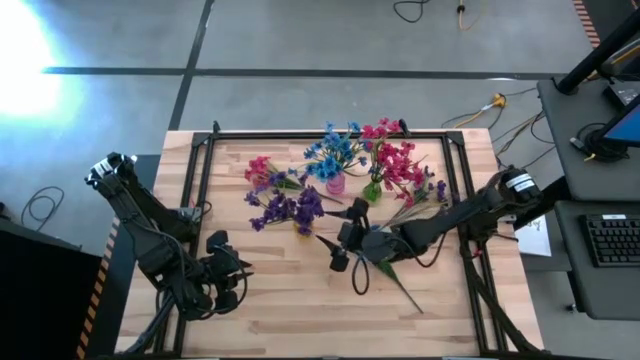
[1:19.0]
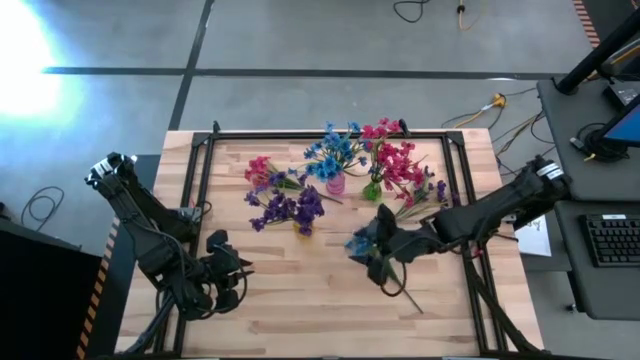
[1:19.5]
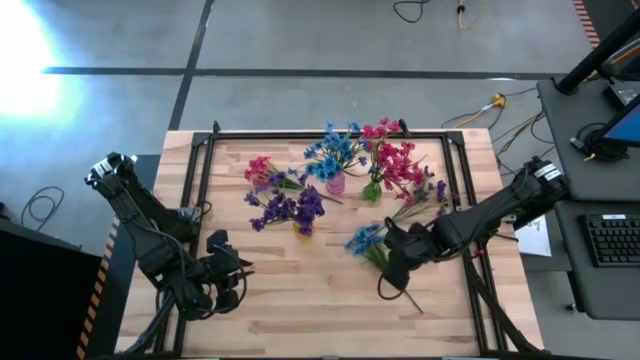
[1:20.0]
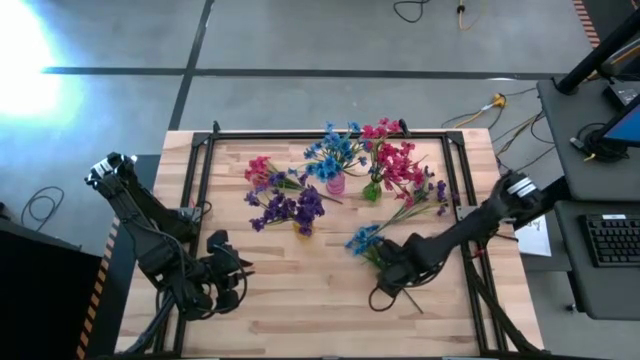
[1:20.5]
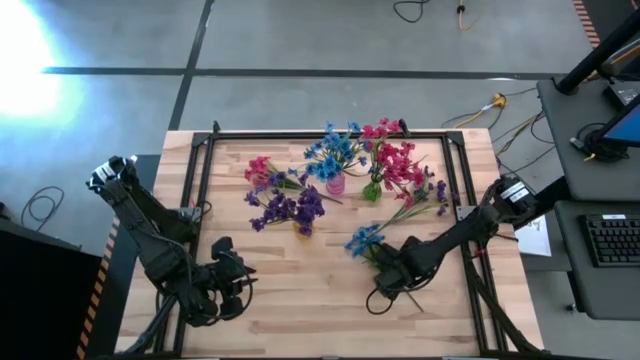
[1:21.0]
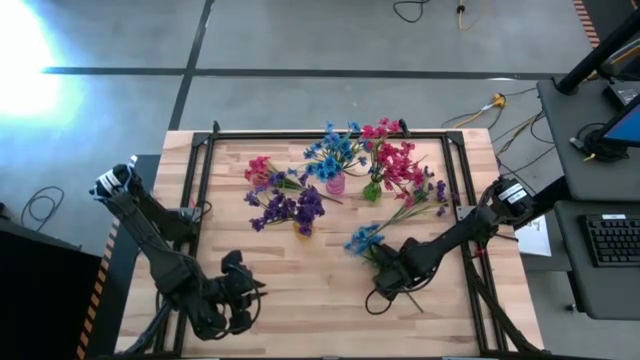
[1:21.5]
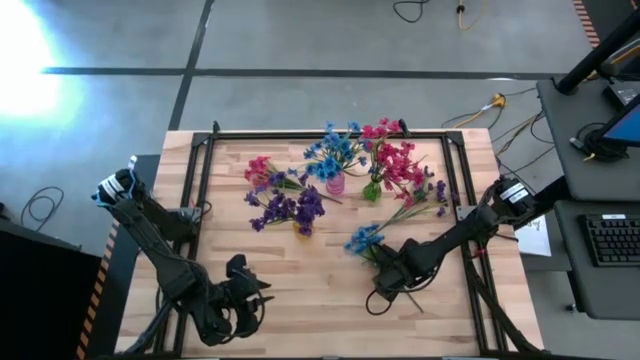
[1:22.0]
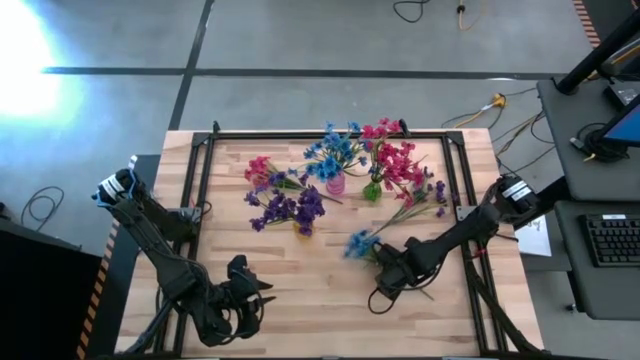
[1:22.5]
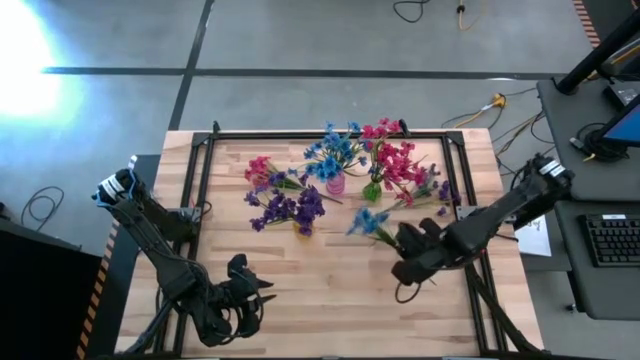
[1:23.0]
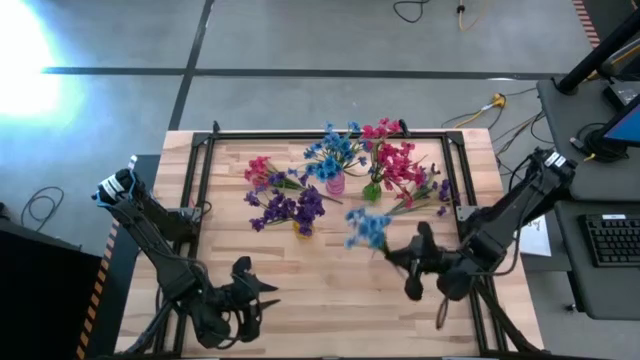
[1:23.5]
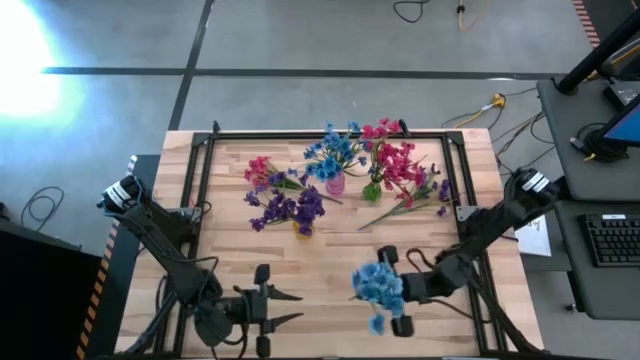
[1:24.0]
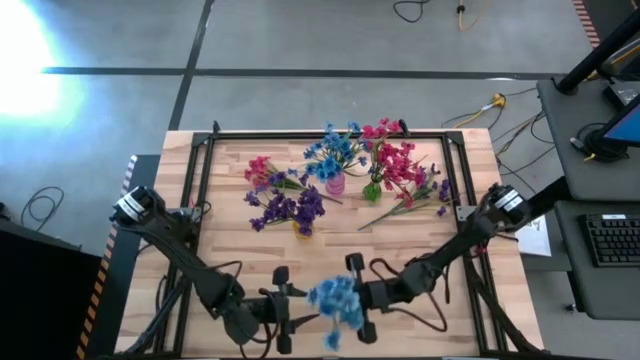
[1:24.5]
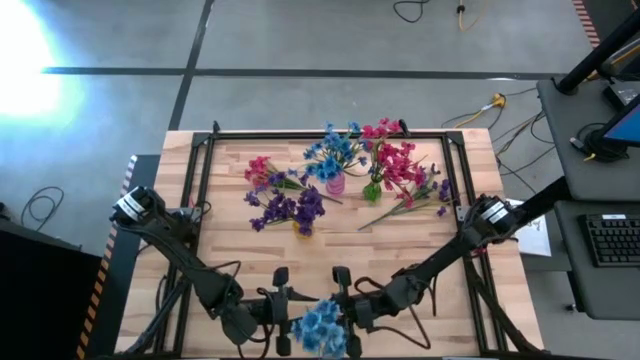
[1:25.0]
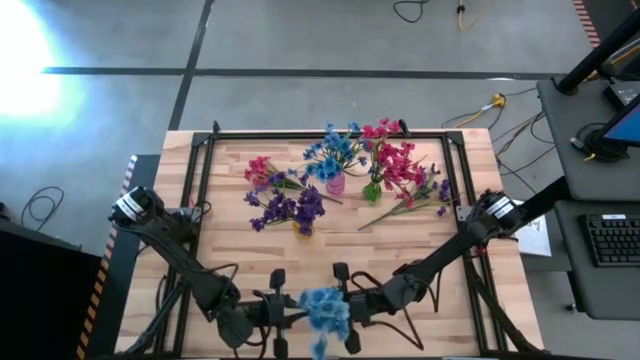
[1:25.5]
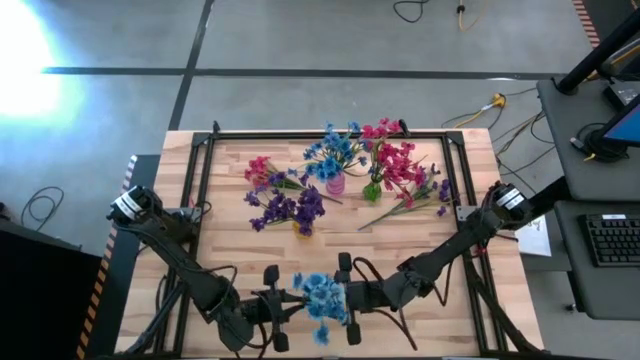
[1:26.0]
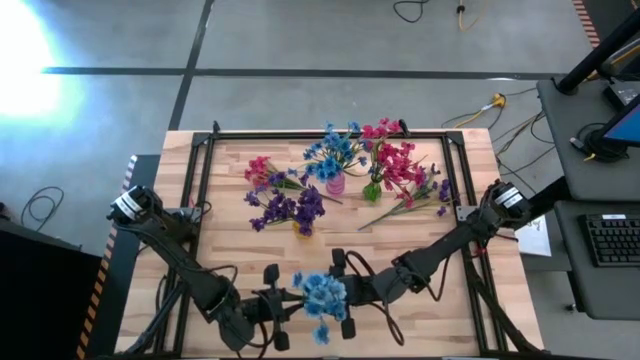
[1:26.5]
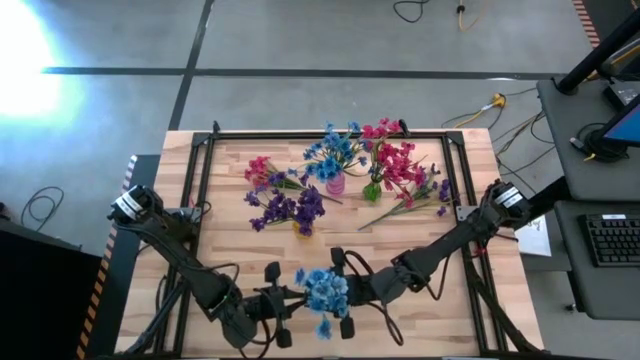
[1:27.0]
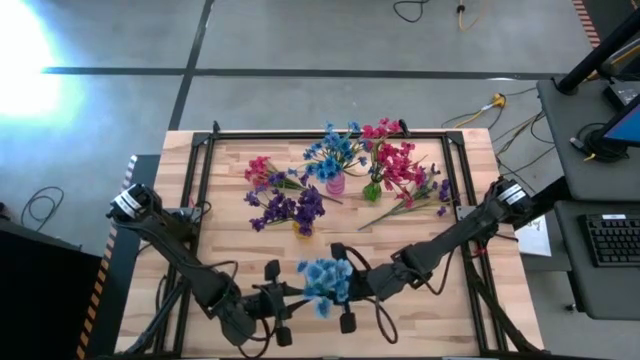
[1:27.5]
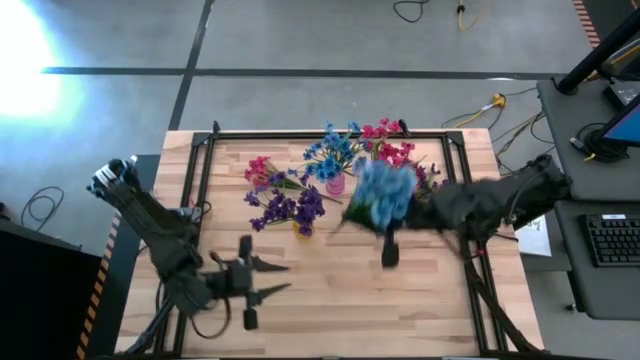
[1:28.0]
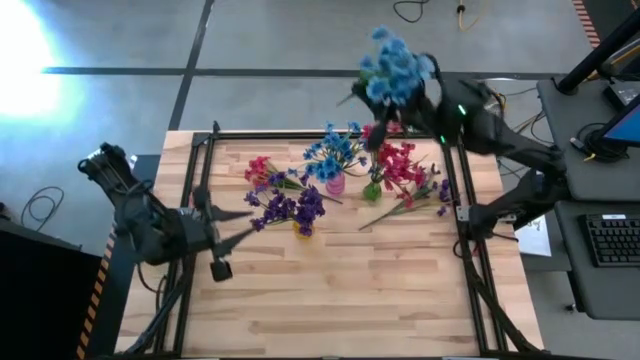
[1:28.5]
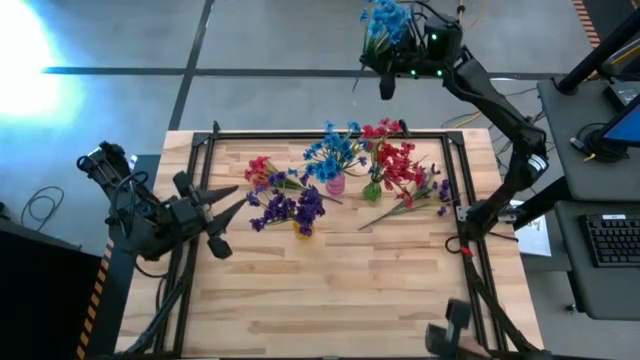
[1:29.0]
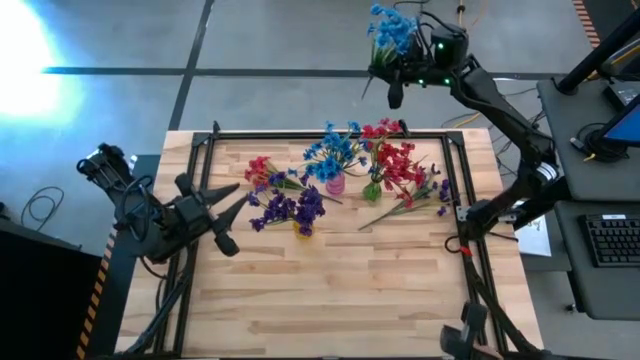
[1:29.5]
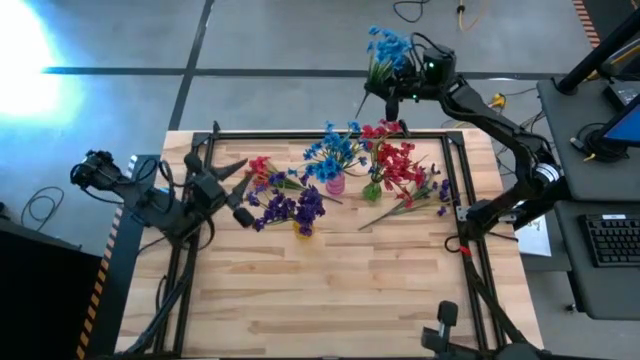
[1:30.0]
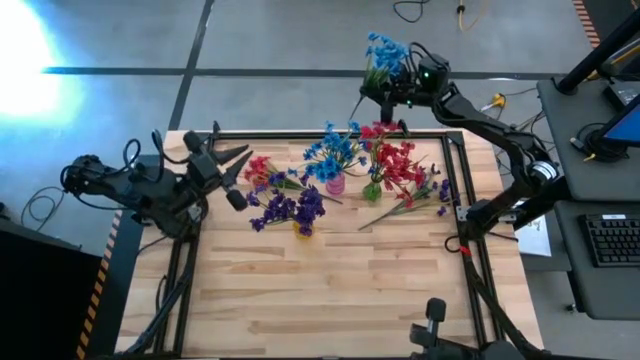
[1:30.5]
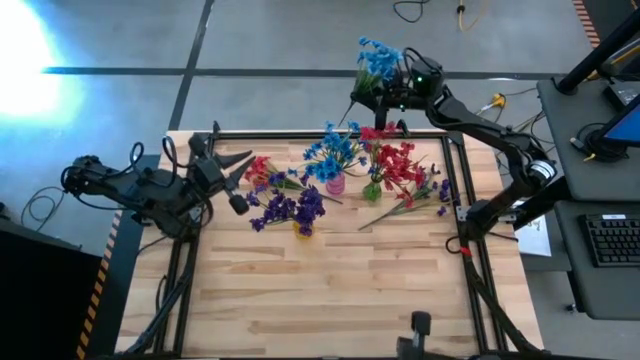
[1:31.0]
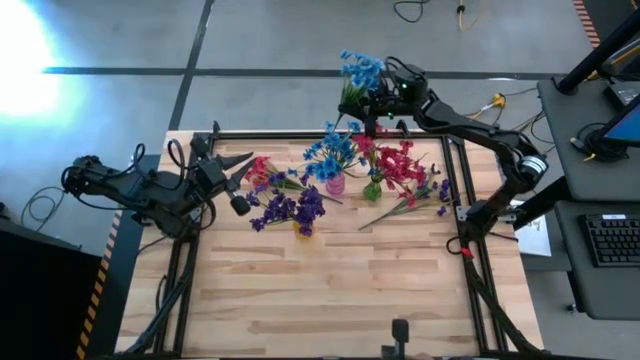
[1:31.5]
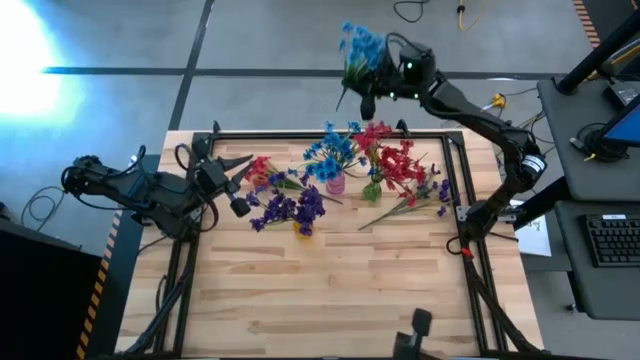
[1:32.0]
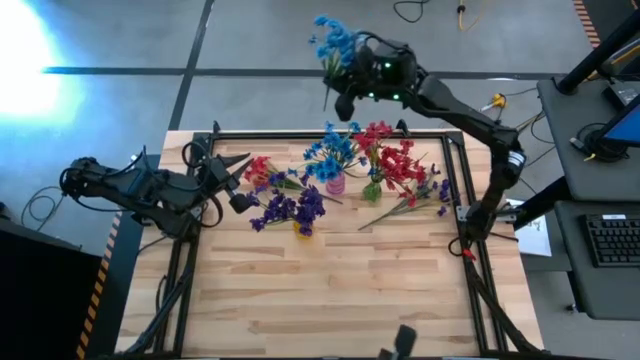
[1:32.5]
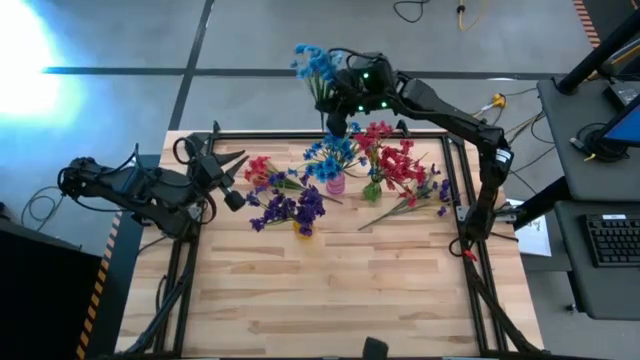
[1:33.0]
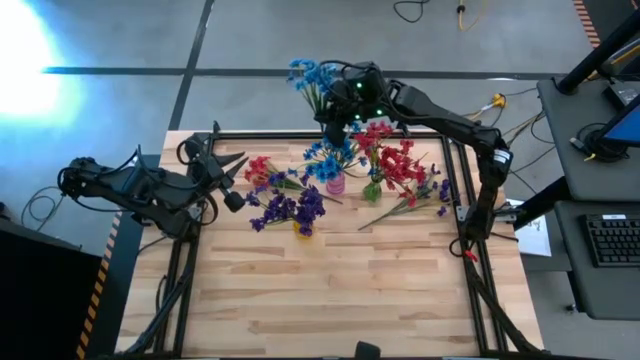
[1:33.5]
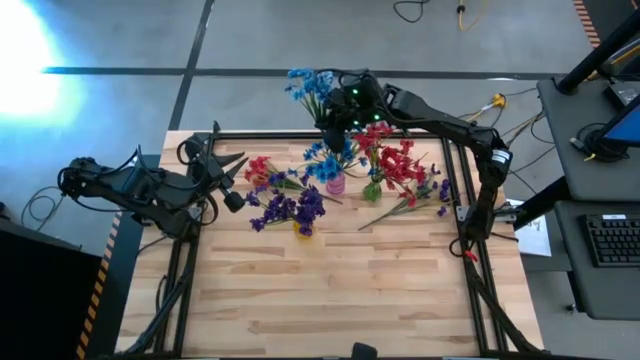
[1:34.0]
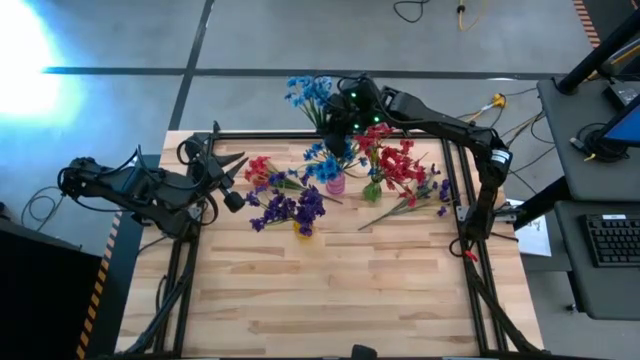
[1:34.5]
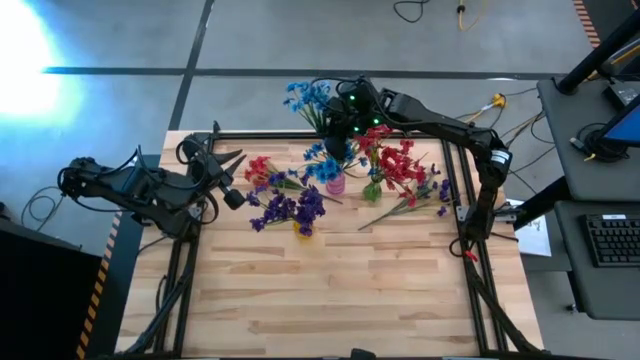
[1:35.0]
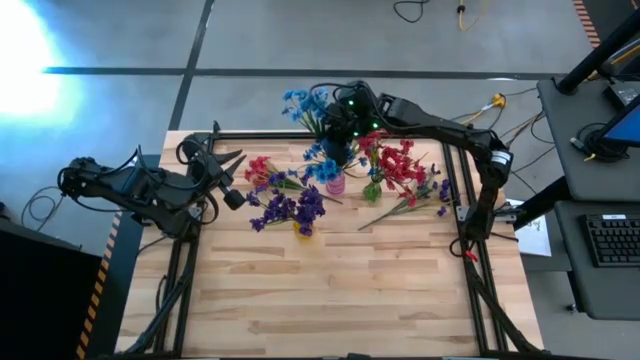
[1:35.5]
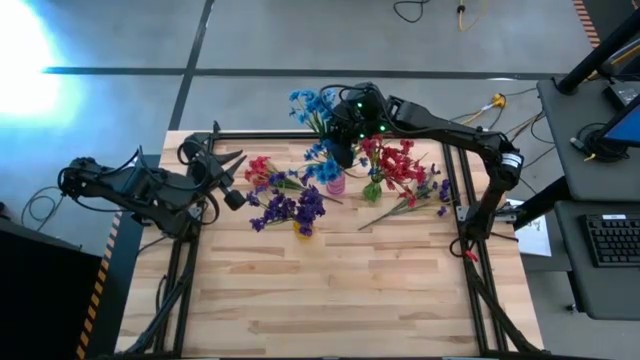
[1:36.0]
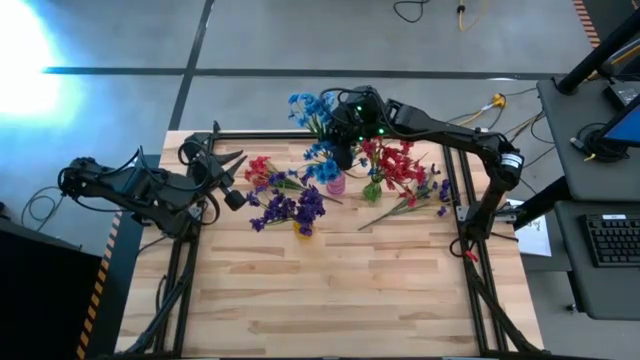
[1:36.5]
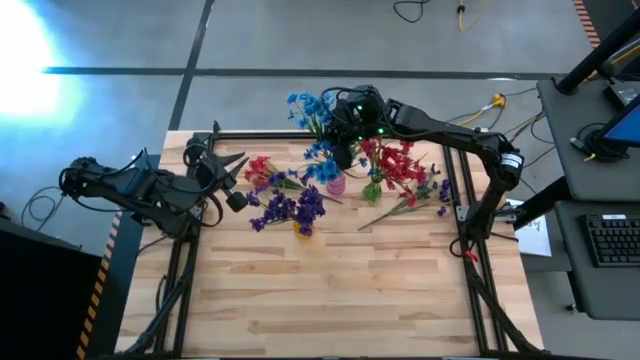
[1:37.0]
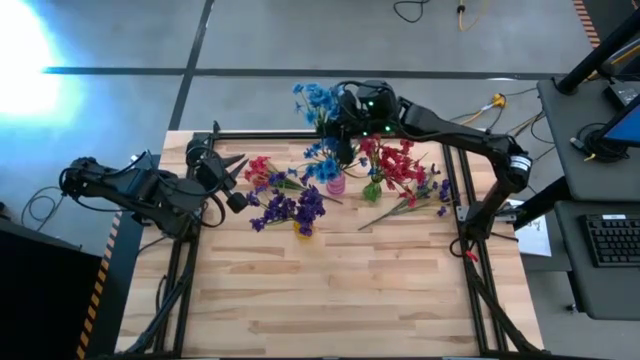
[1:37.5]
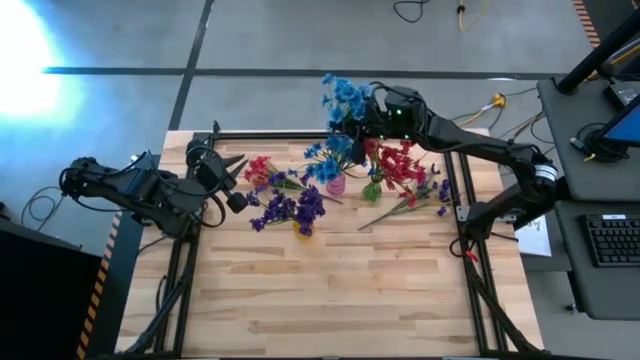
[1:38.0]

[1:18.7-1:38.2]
Task: Sort flowers into vase by color
Put the blue flowers into the pink vase
